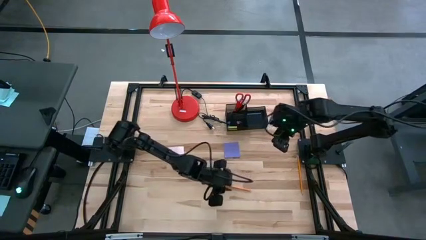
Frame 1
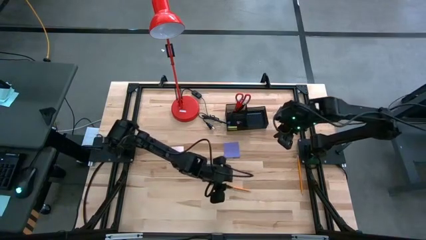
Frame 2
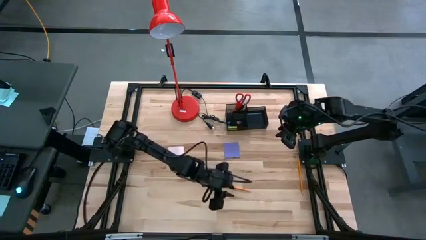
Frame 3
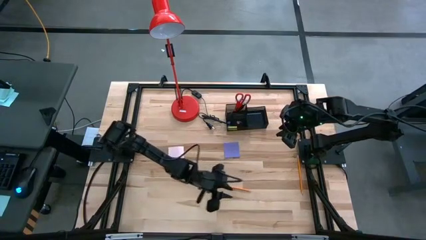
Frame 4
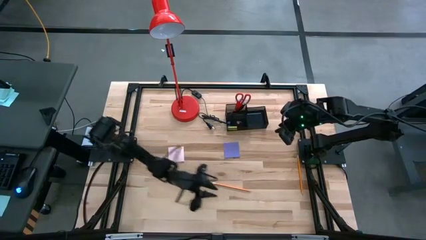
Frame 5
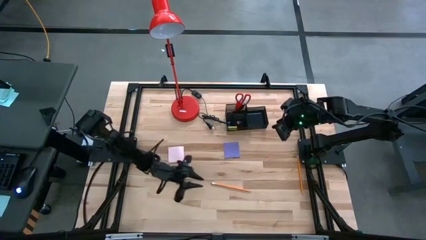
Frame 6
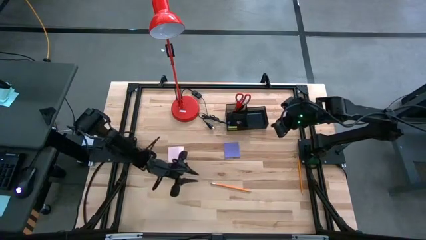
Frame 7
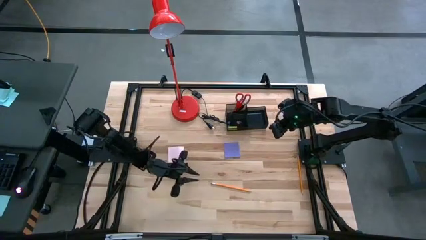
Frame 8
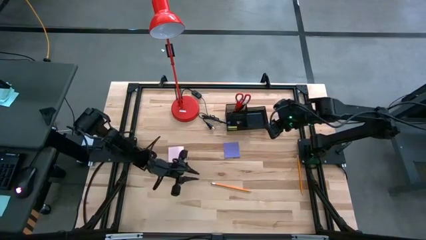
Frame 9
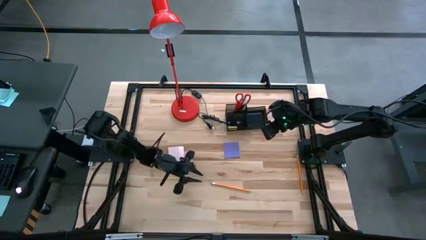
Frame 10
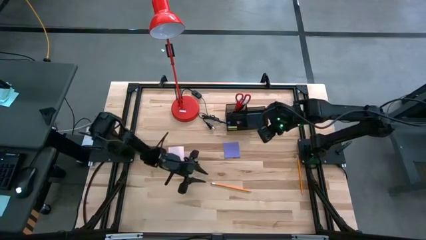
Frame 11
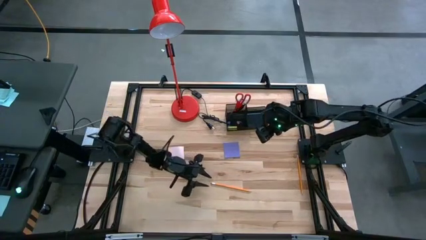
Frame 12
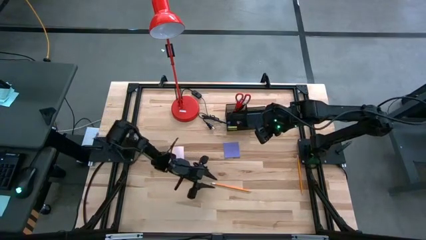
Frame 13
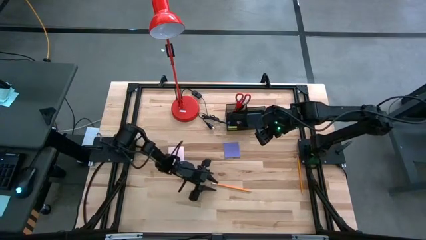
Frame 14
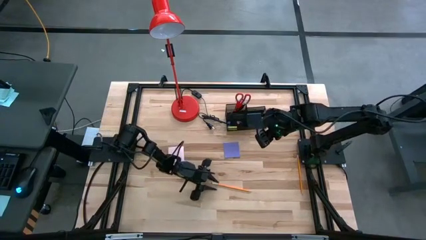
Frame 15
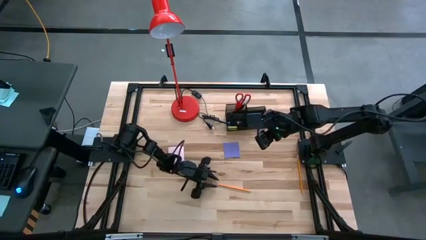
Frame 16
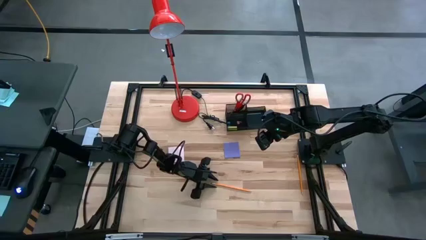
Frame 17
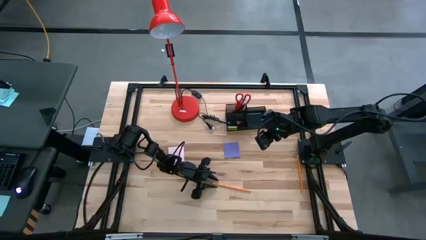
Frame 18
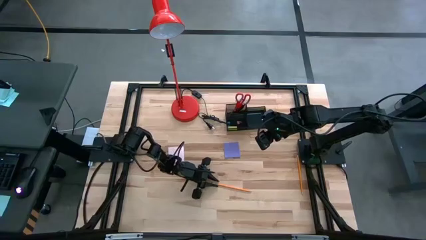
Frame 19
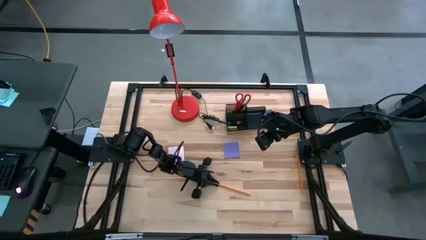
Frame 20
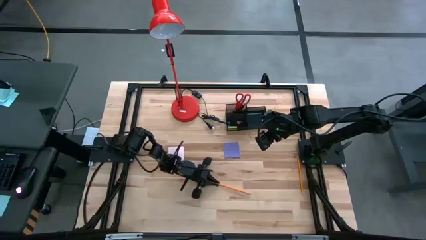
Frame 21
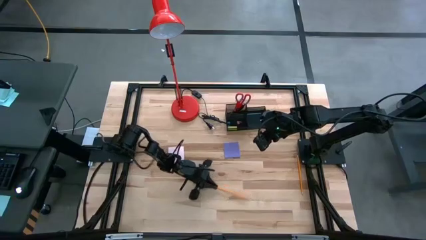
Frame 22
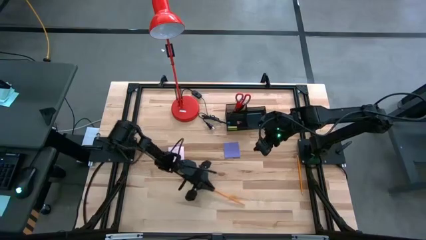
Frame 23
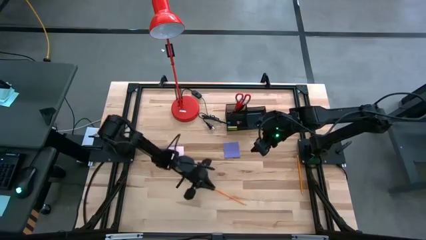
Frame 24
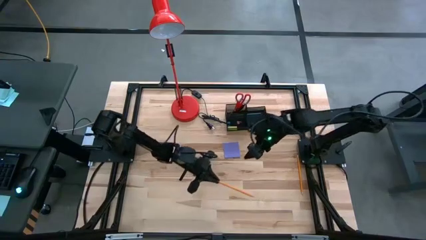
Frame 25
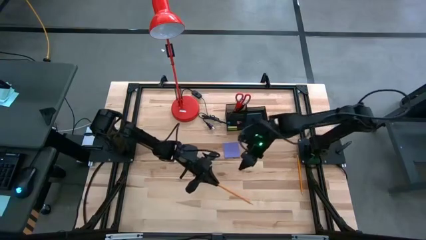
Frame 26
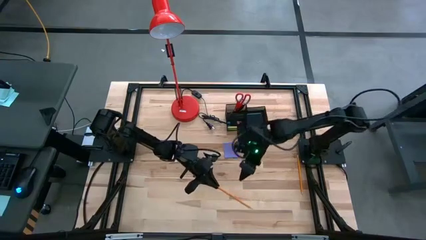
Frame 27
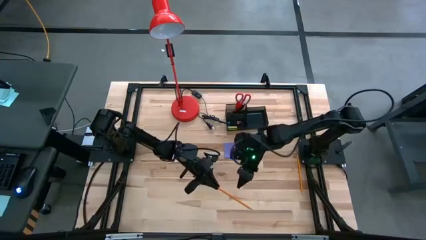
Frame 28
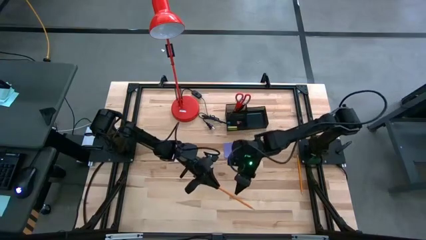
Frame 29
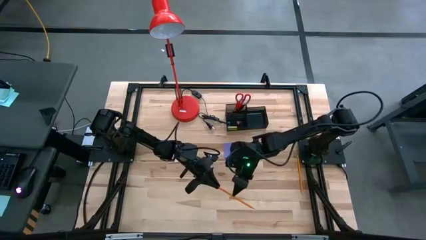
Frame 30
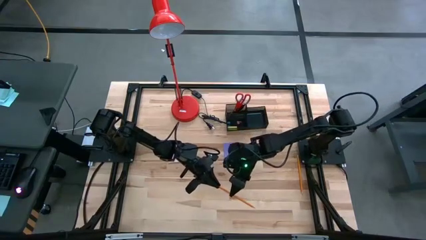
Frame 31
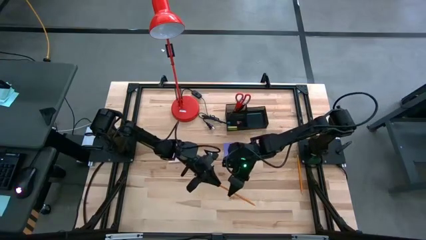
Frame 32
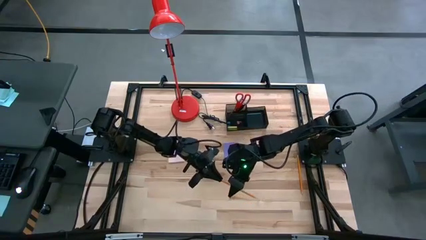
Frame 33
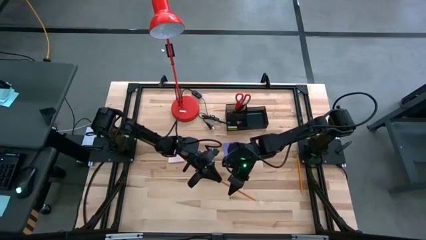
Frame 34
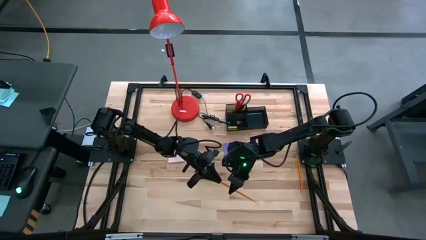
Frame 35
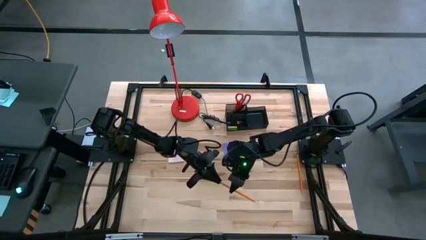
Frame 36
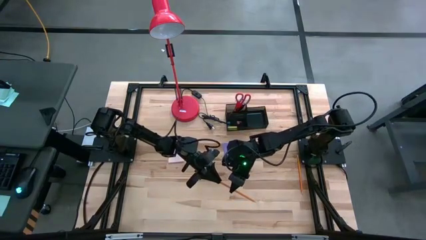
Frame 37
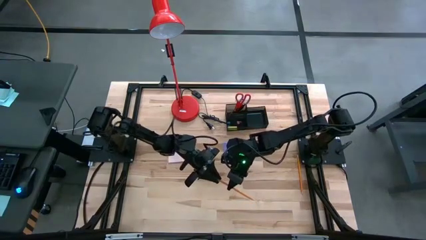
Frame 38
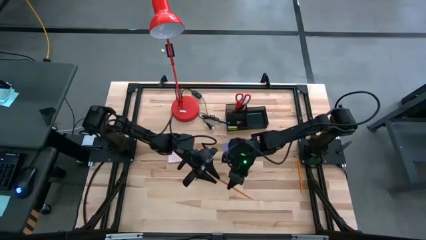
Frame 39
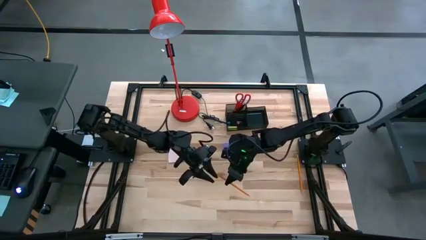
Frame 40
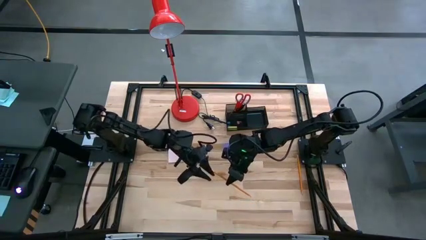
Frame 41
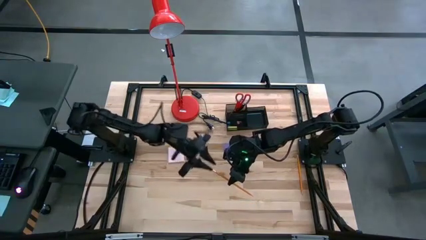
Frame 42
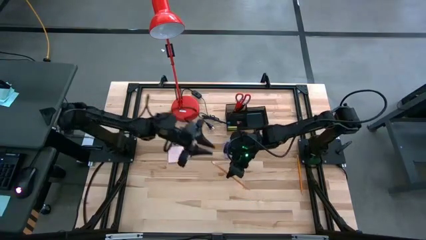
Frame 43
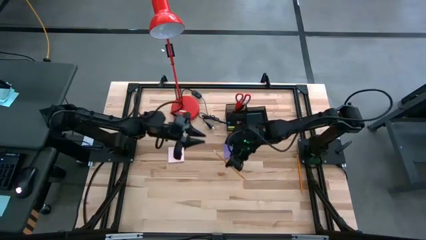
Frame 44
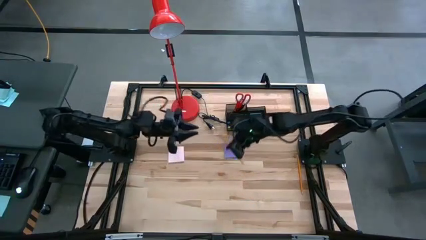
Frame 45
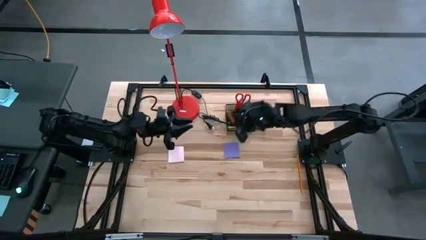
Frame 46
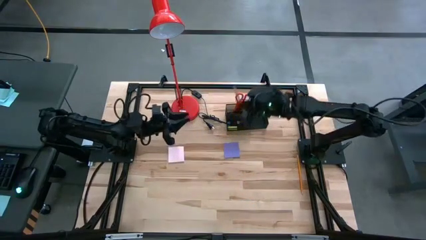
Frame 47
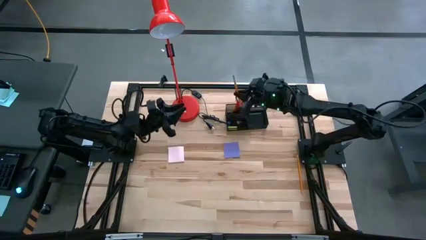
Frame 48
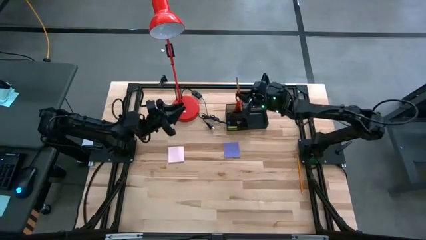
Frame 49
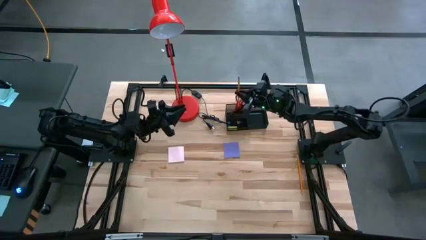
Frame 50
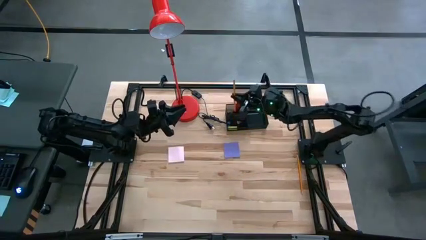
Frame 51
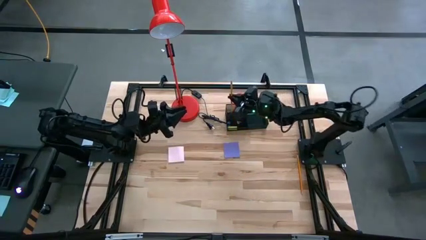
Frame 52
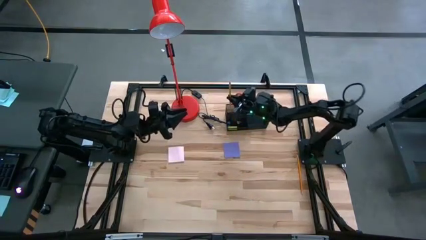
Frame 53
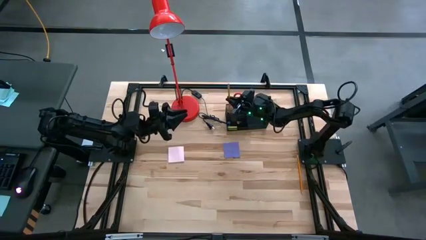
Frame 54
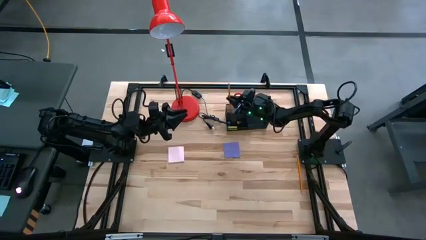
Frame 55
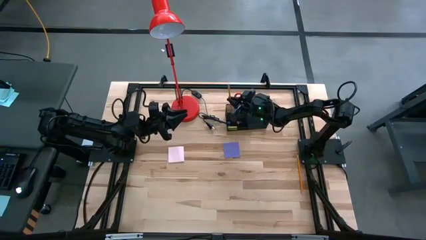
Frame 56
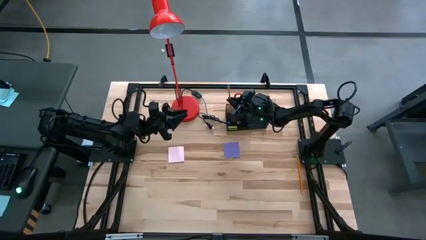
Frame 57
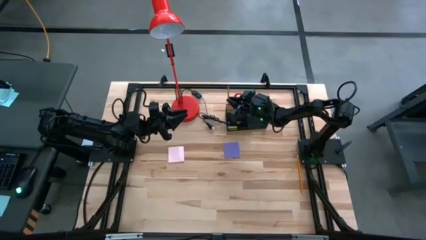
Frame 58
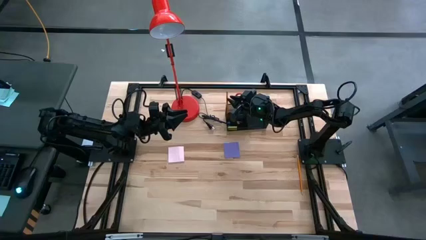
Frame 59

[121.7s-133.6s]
Task: Pick and place office supplies into organizer
Put the left orange pencil into the black desk organizer
